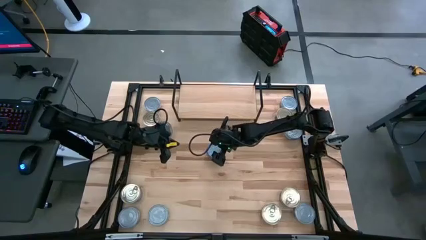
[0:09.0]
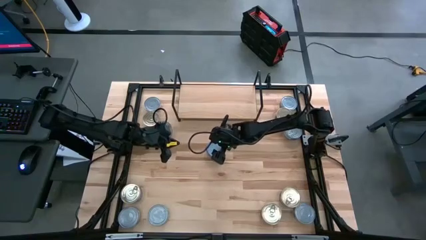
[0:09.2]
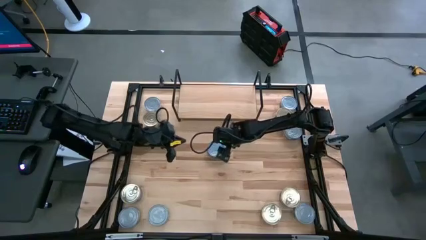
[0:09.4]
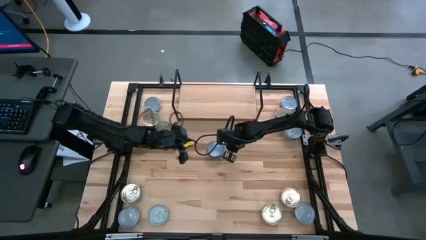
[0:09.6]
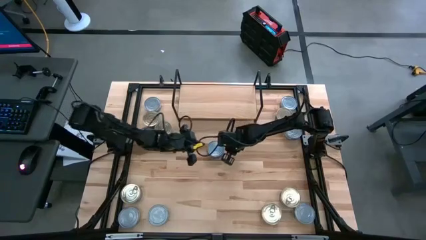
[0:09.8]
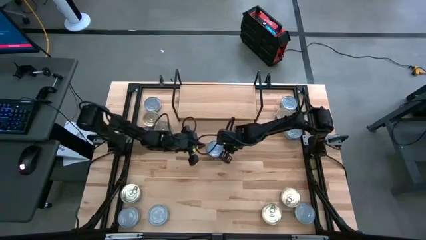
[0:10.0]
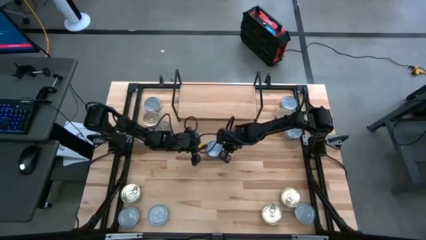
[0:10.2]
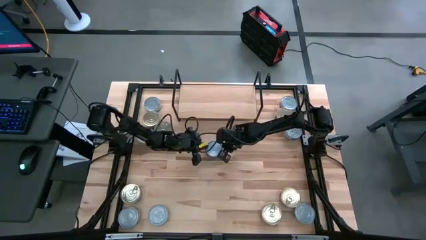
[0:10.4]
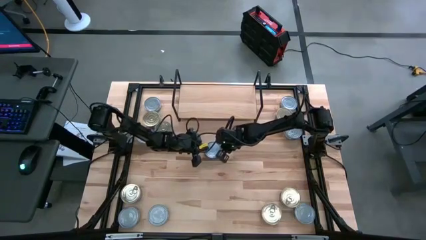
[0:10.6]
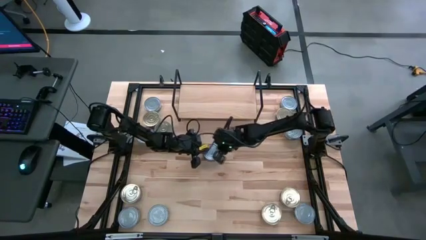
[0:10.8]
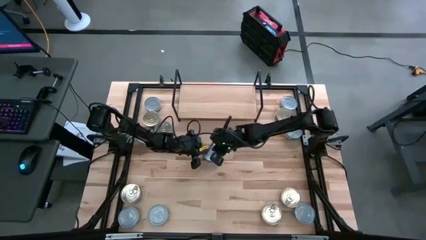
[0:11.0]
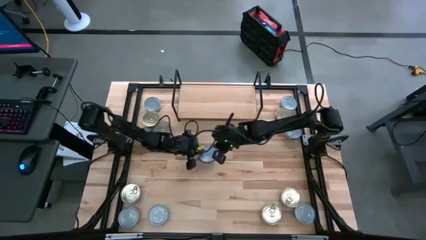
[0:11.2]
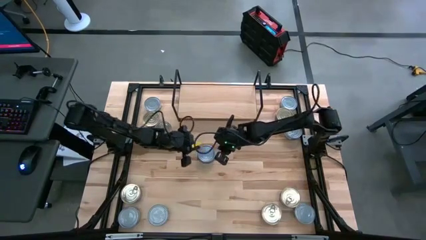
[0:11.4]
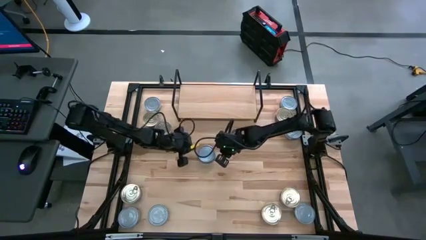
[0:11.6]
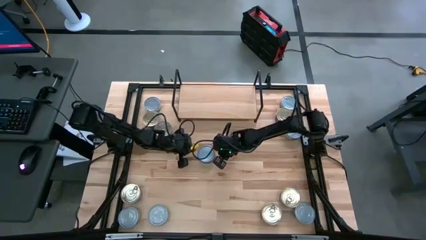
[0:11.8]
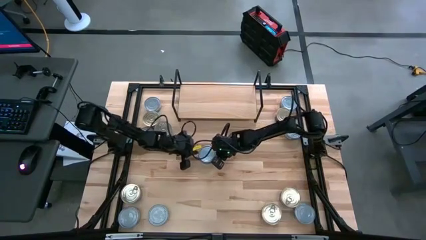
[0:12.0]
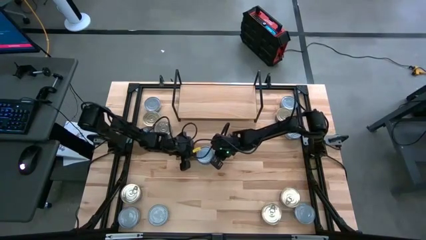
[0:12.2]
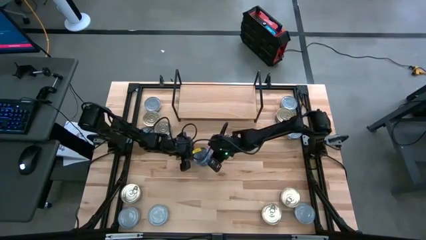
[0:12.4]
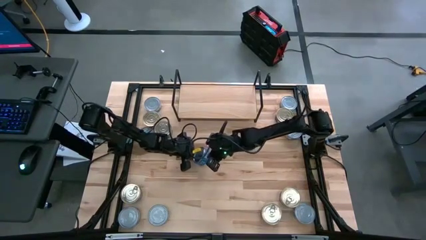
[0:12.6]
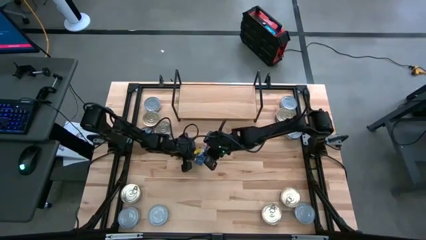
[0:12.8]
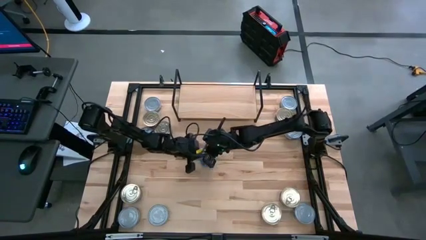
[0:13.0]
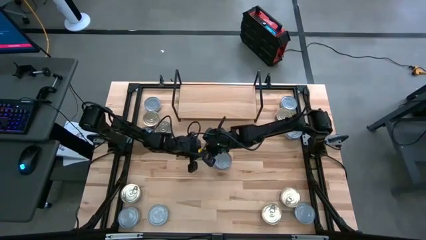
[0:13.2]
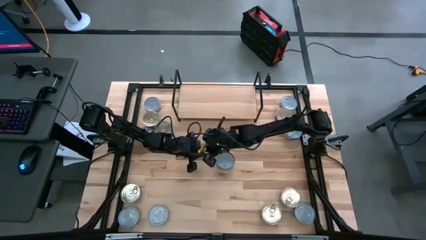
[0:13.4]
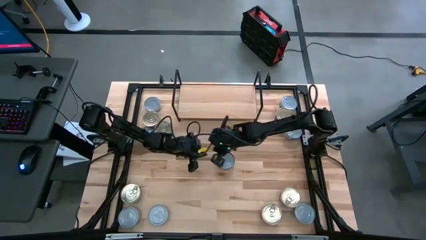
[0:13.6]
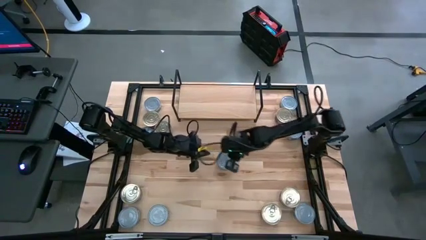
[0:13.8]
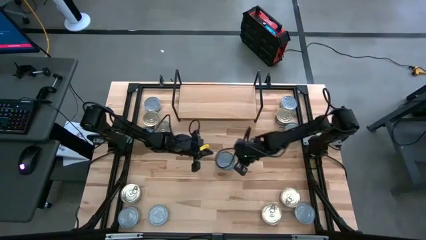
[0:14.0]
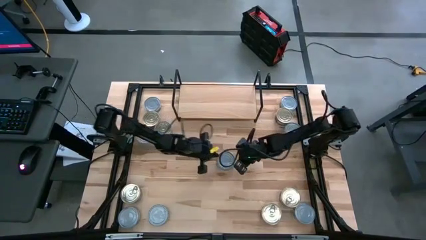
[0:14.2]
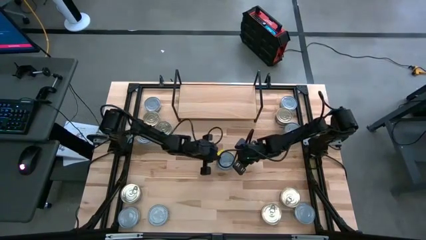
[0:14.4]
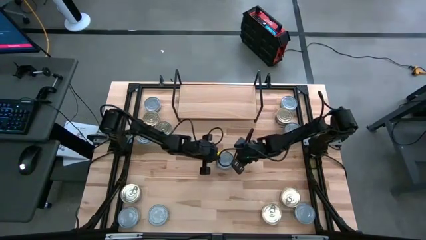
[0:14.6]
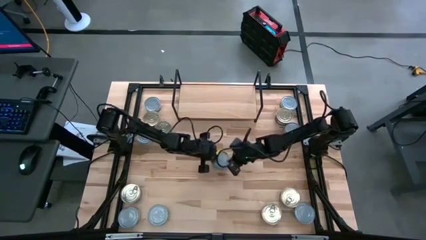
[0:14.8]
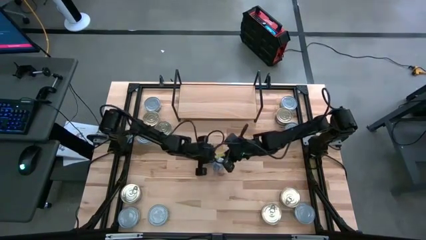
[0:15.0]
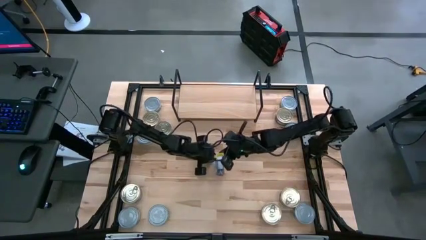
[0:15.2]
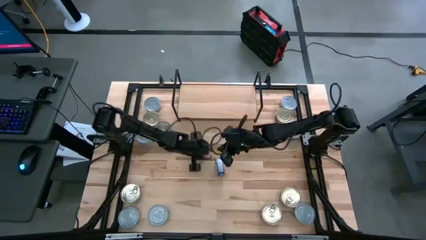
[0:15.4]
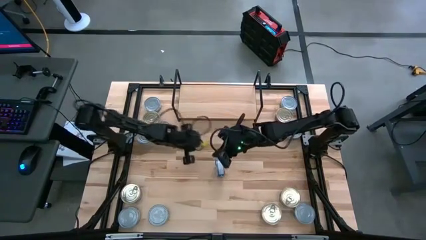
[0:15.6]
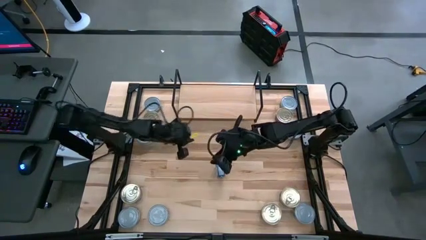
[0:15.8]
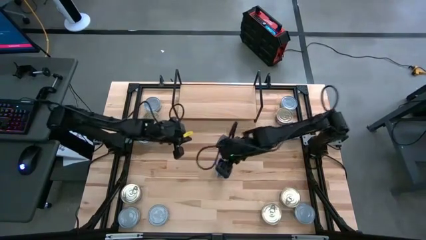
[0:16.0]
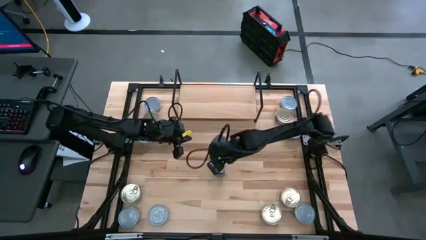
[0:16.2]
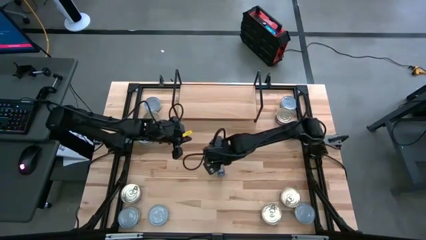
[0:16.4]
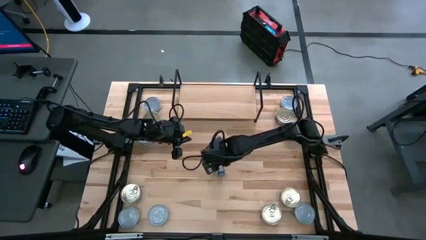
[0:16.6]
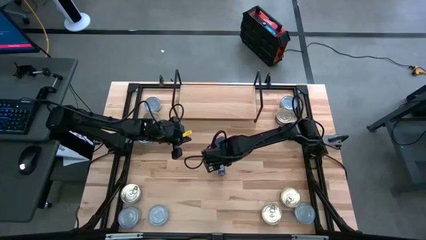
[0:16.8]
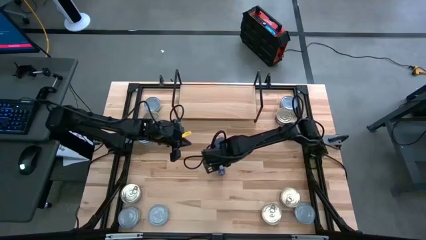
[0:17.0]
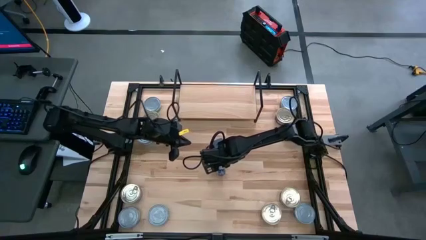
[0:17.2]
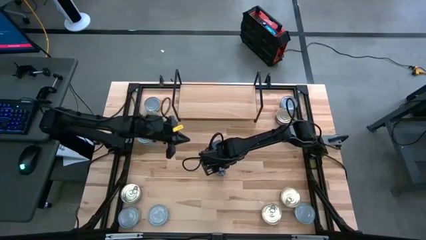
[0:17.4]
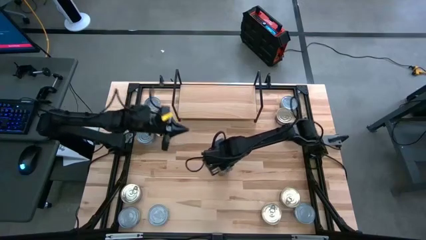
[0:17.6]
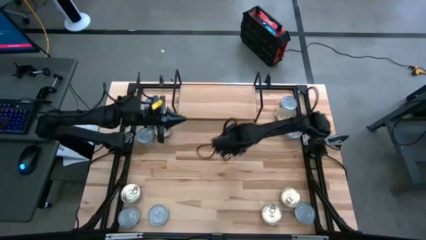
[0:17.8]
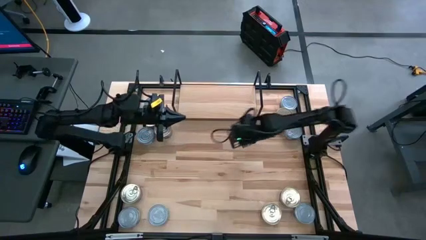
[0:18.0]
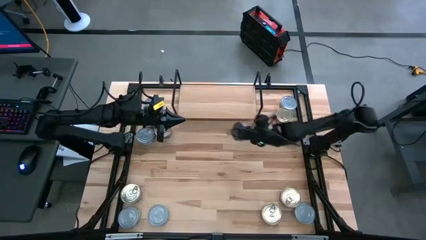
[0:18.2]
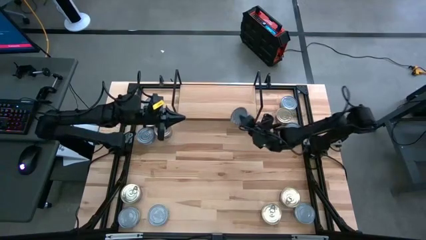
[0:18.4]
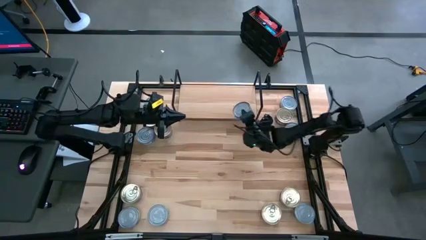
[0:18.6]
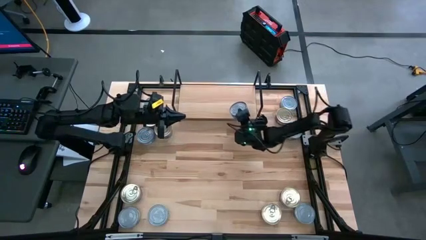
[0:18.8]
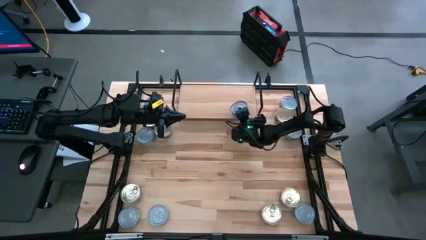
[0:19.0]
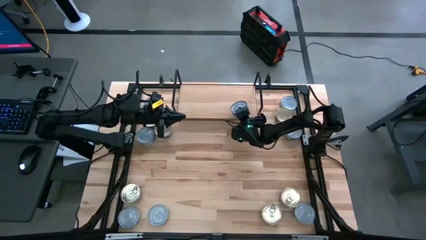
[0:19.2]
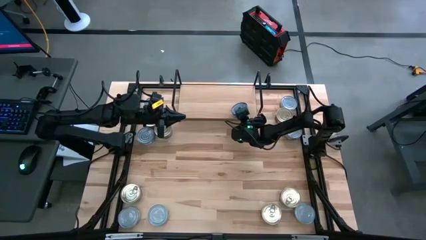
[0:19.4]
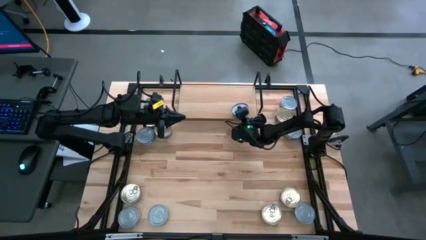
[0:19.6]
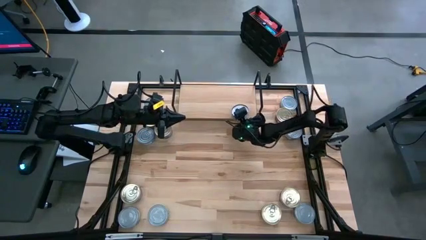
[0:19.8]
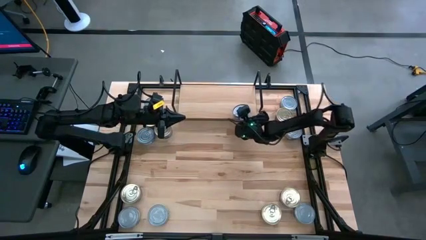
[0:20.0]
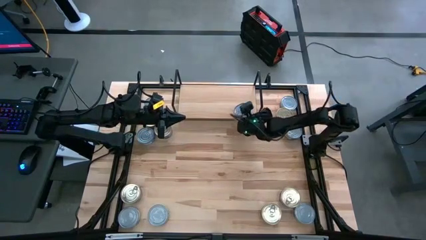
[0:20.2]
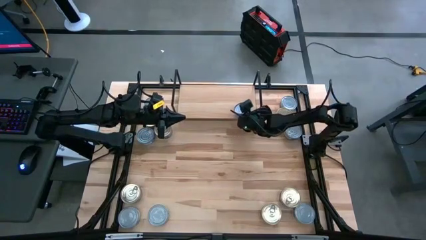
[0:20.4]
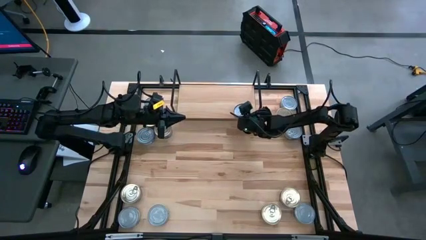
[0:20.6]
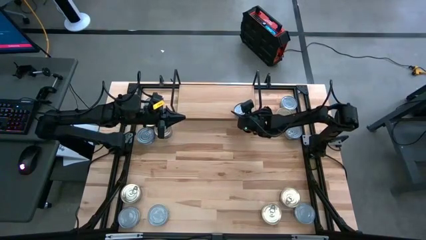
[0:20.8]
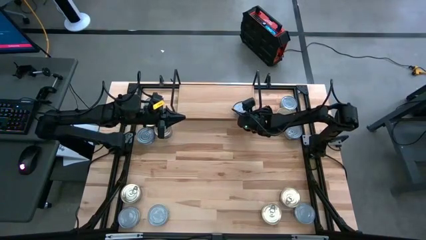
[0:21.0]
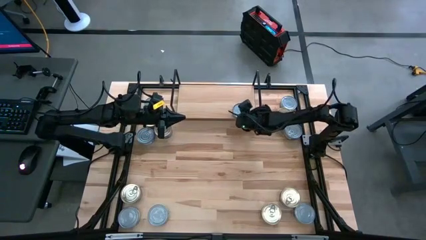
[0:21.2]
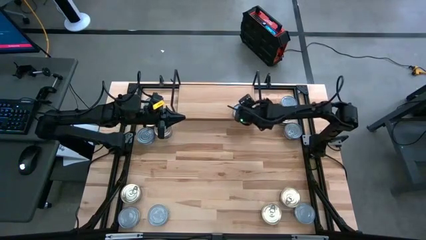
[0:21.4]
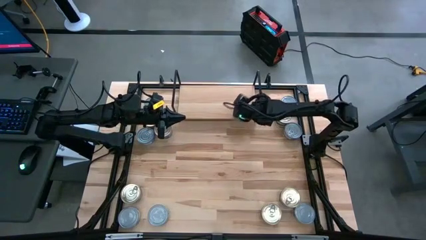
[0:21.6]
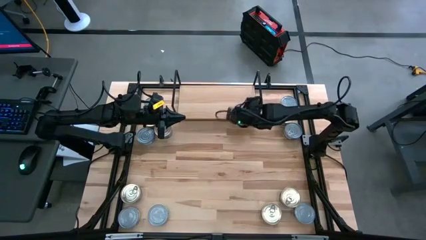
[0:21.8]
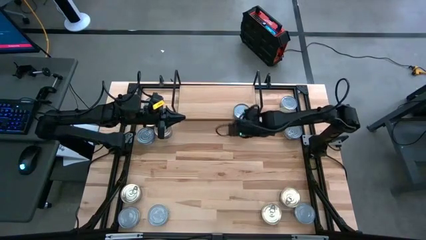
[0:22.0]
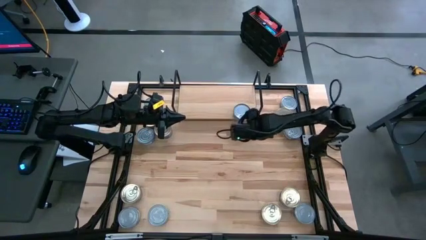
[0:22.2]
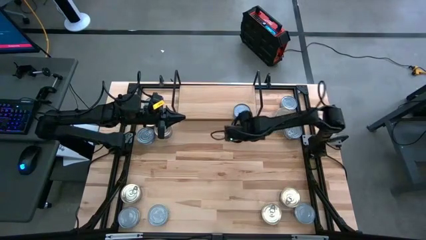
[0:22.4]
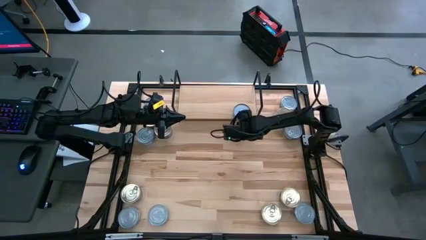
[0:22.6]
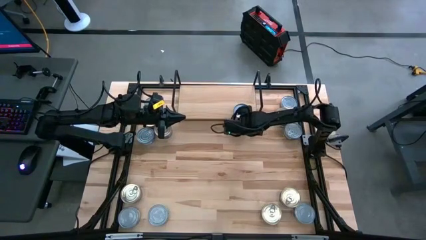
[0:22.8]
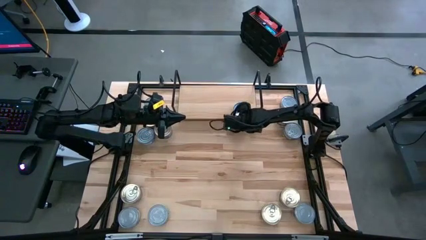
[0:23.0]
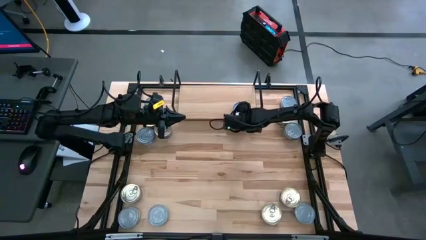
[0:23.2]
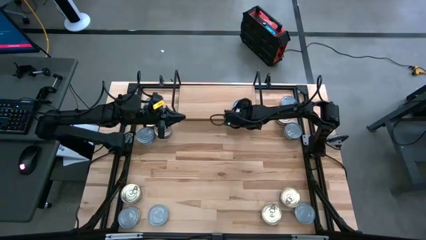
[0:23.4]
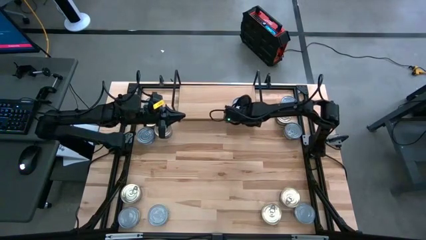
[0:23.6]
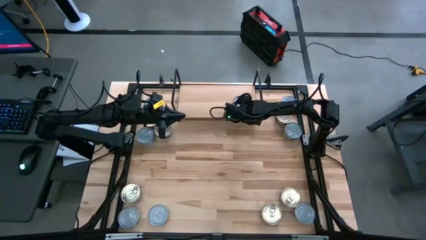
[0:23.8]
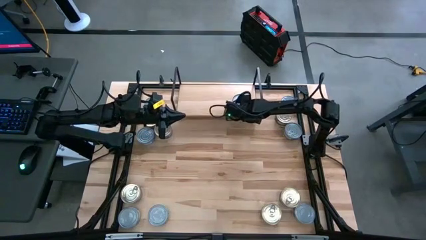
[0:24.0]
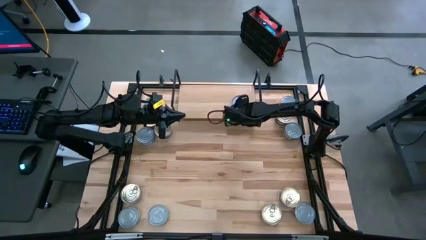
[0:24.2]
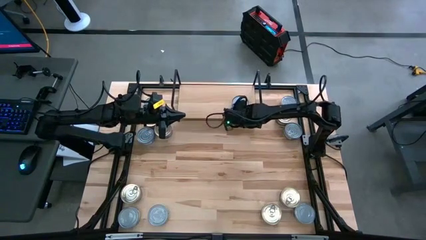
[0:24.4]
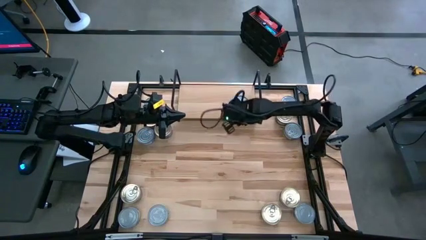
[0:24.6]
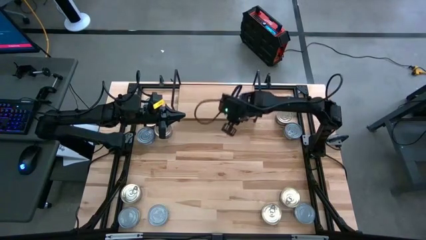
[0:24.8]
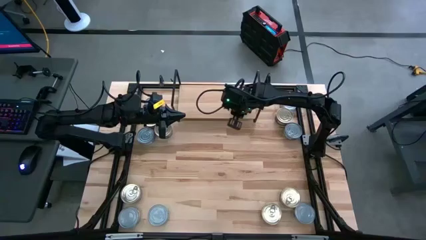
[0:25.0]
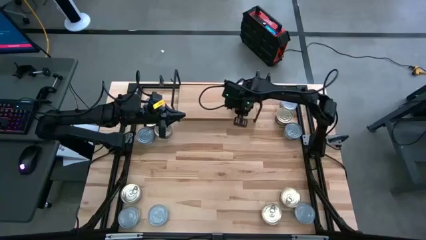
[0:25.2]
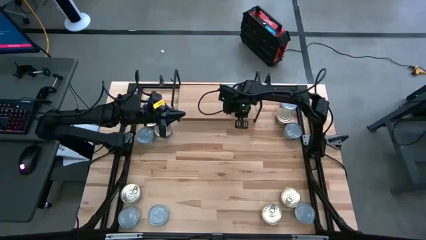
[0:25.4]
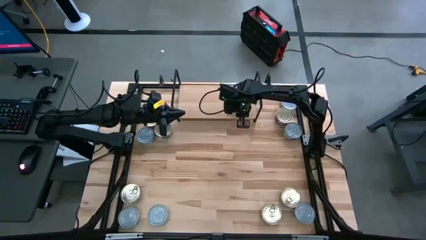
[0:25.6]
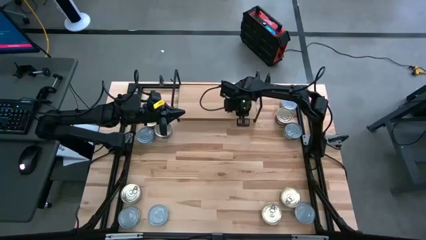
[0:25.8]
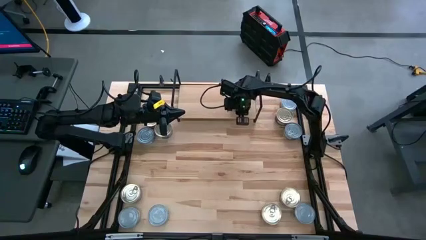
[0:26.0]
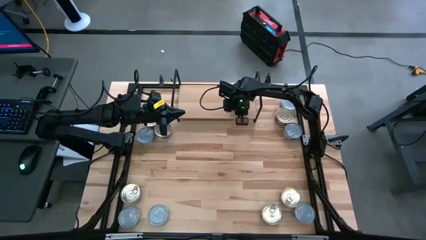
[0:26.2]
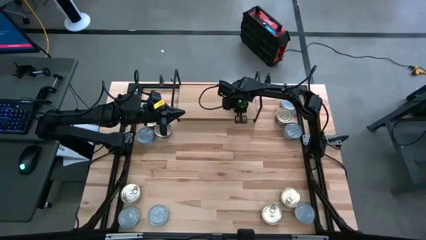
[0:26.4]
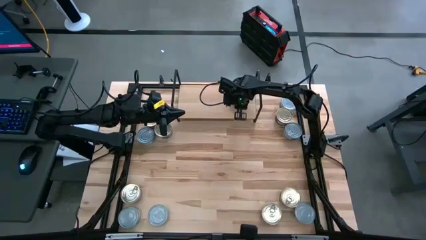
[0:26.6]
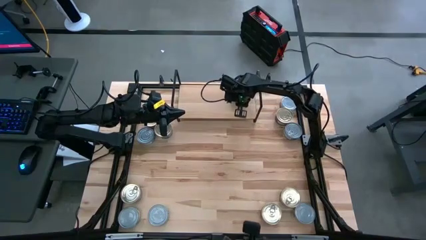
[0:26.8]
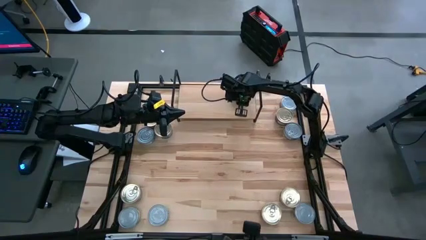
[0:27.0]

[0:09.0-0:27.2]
Task: Stack canned seafood by type on shelf
Put the blue tuna can on the shelf
